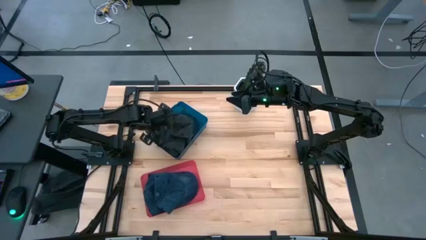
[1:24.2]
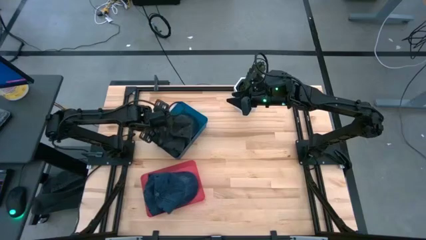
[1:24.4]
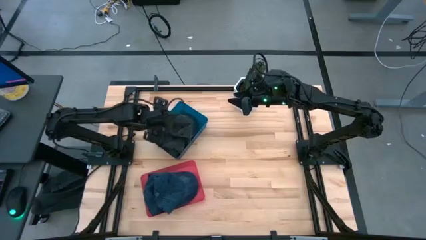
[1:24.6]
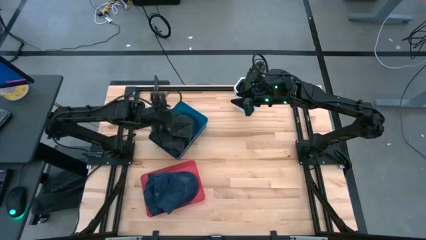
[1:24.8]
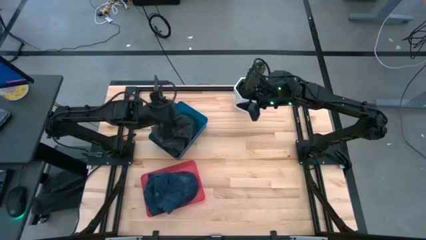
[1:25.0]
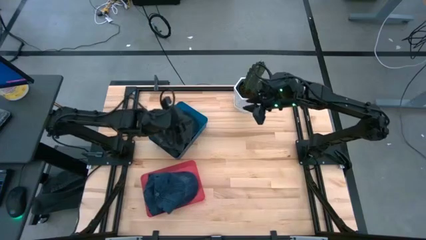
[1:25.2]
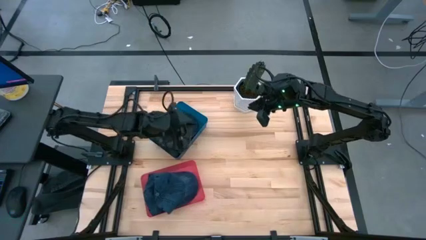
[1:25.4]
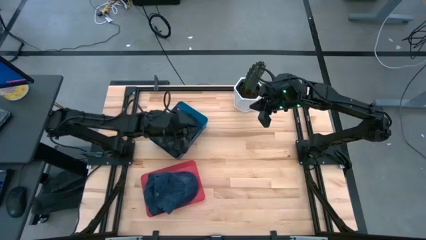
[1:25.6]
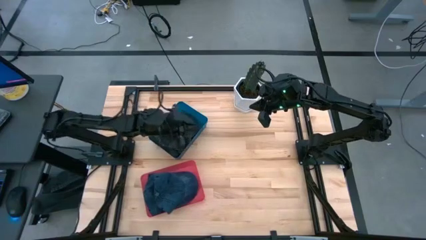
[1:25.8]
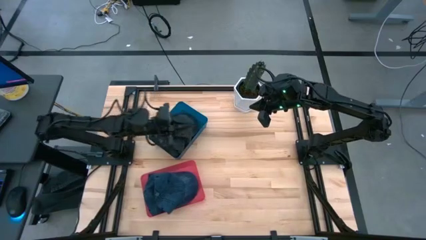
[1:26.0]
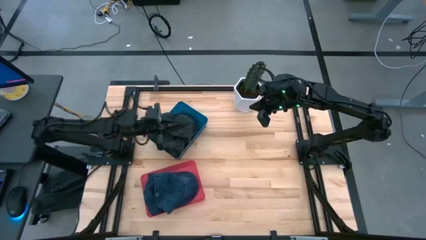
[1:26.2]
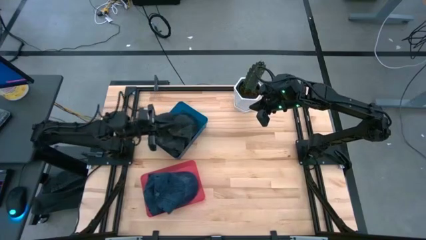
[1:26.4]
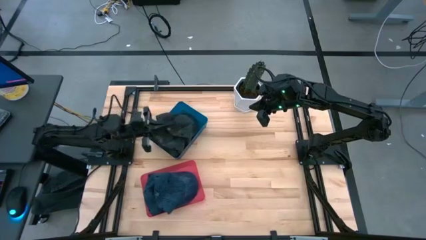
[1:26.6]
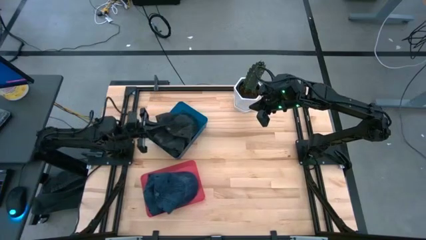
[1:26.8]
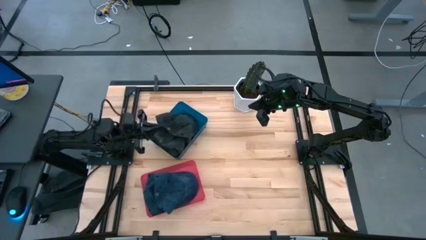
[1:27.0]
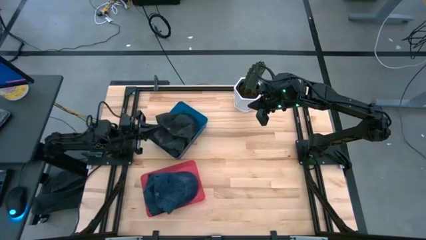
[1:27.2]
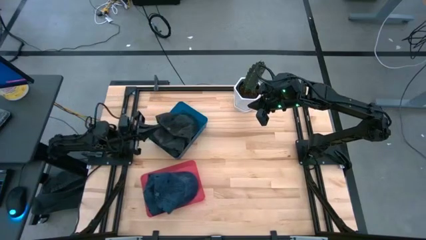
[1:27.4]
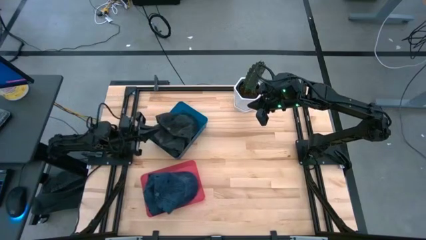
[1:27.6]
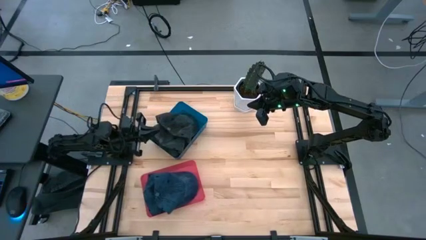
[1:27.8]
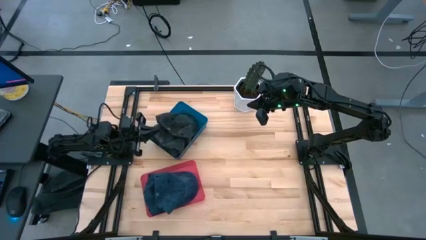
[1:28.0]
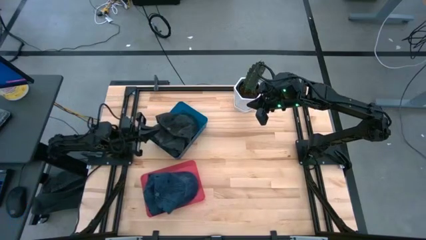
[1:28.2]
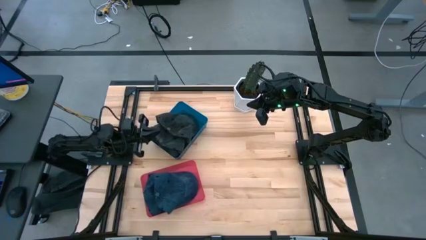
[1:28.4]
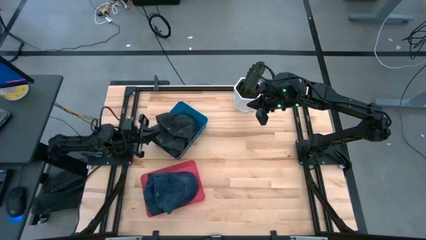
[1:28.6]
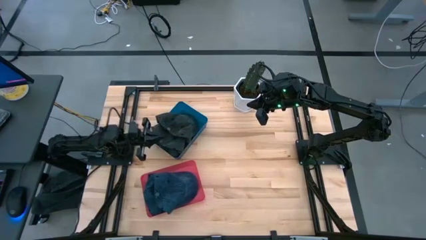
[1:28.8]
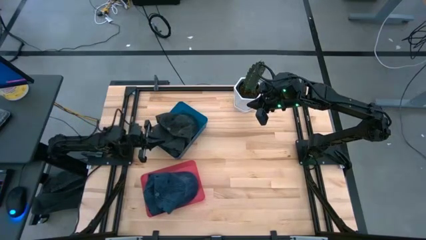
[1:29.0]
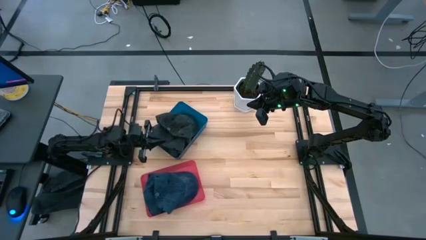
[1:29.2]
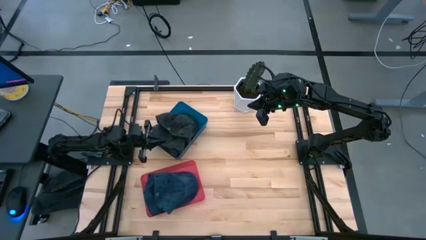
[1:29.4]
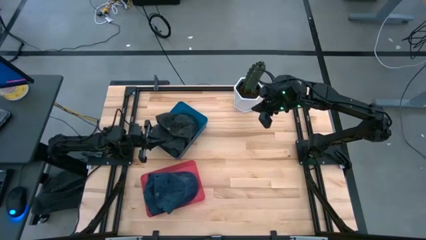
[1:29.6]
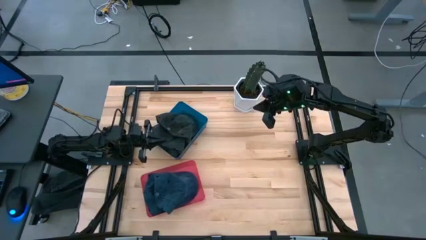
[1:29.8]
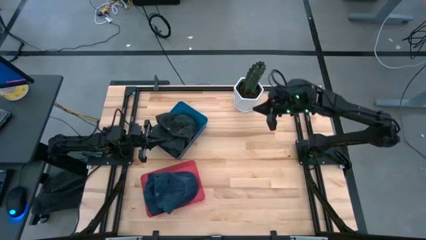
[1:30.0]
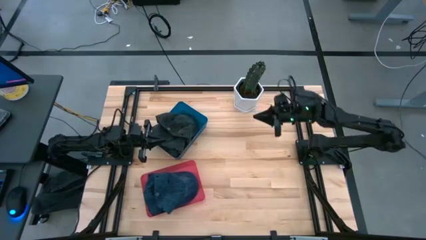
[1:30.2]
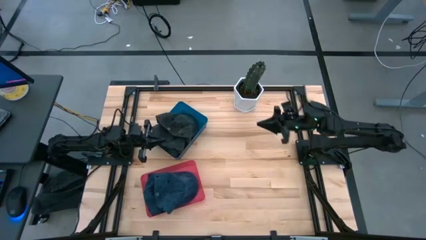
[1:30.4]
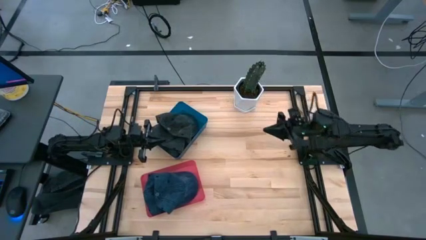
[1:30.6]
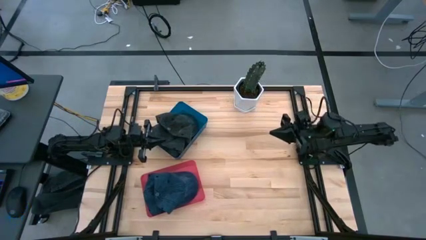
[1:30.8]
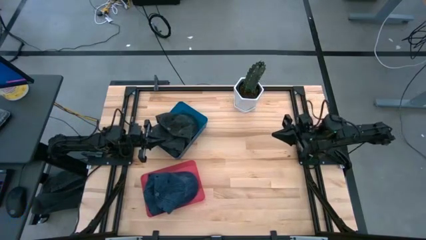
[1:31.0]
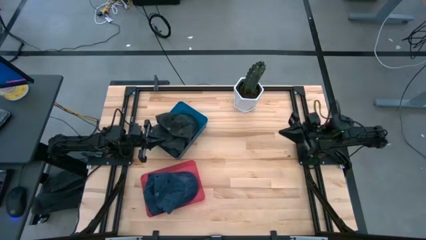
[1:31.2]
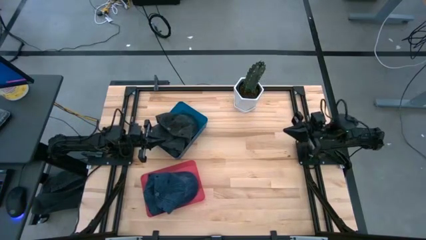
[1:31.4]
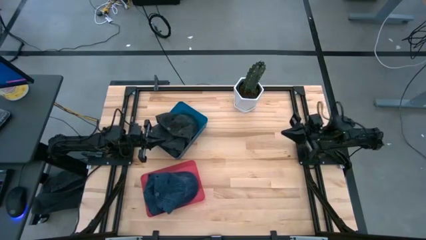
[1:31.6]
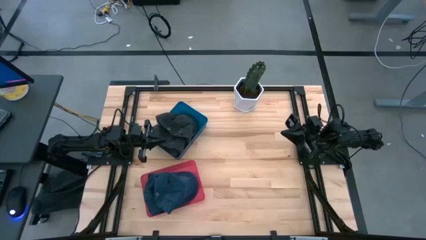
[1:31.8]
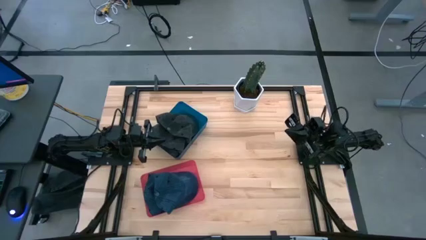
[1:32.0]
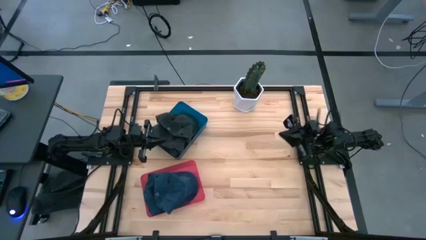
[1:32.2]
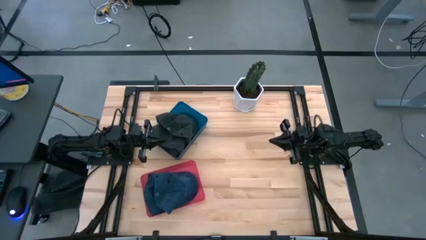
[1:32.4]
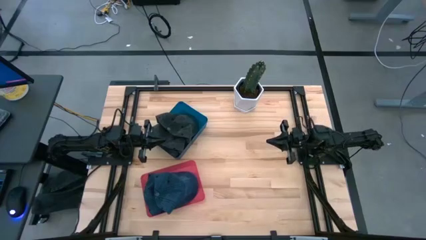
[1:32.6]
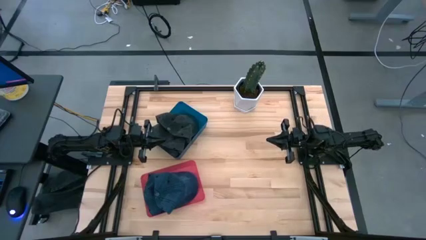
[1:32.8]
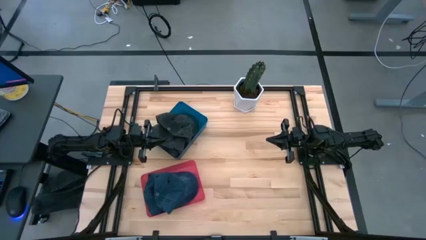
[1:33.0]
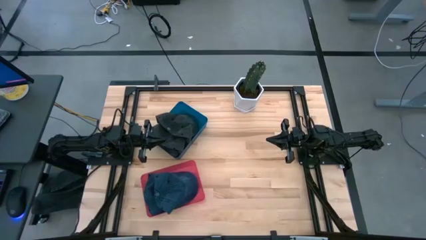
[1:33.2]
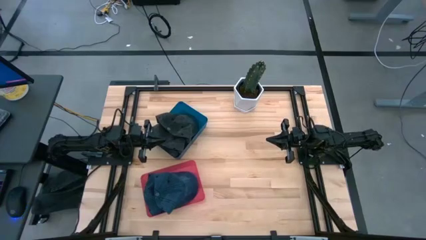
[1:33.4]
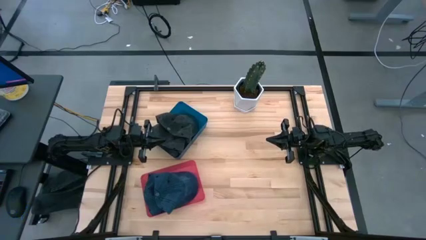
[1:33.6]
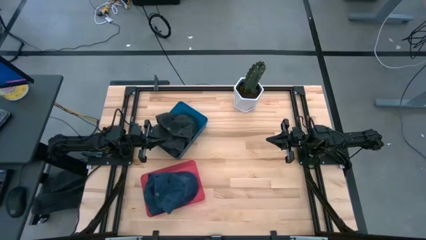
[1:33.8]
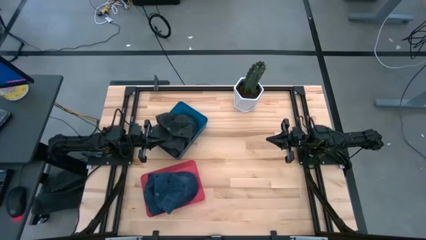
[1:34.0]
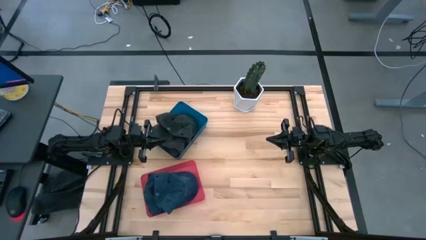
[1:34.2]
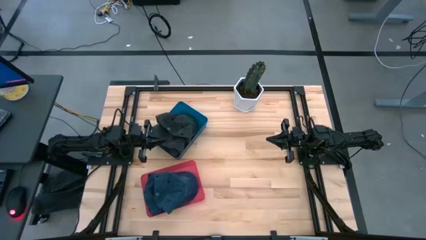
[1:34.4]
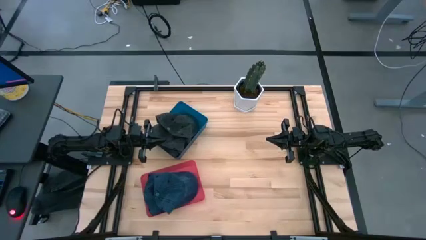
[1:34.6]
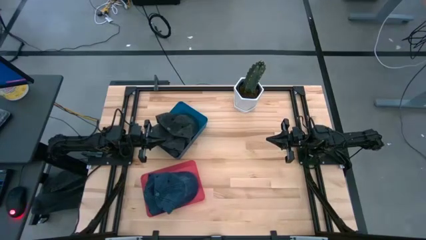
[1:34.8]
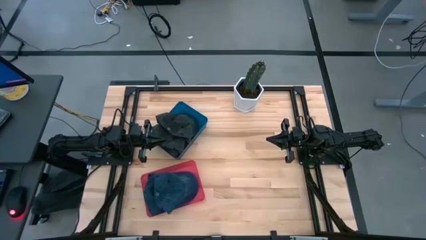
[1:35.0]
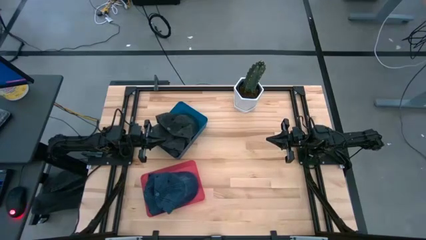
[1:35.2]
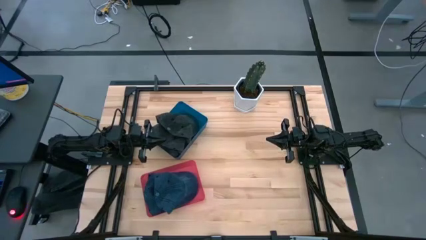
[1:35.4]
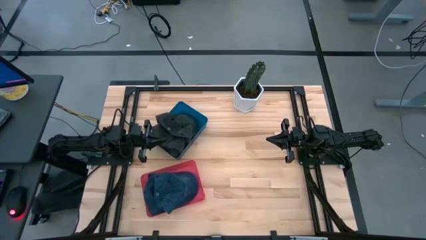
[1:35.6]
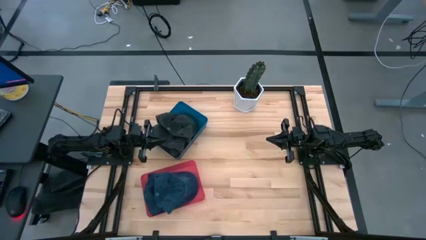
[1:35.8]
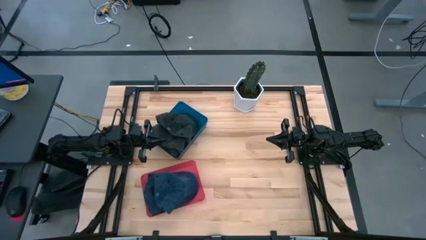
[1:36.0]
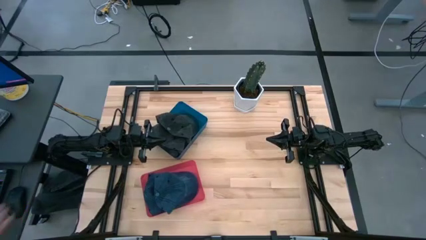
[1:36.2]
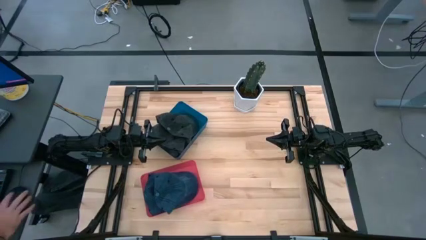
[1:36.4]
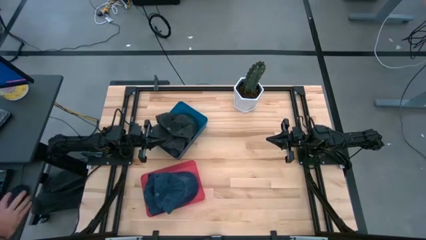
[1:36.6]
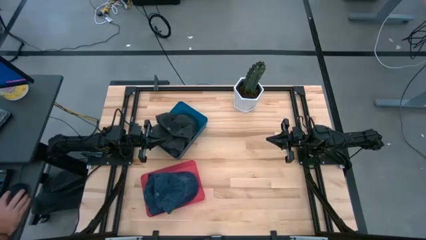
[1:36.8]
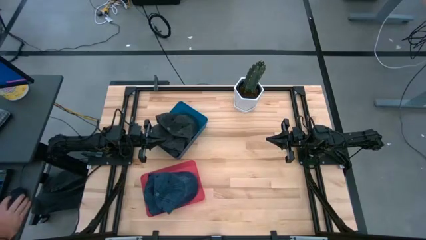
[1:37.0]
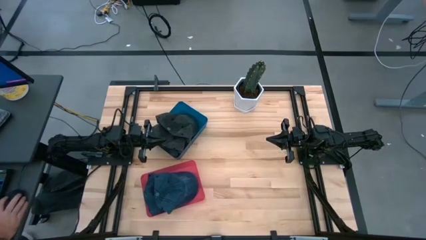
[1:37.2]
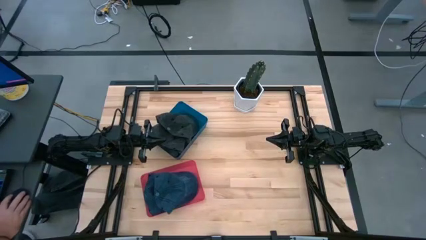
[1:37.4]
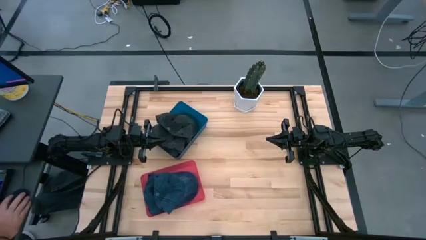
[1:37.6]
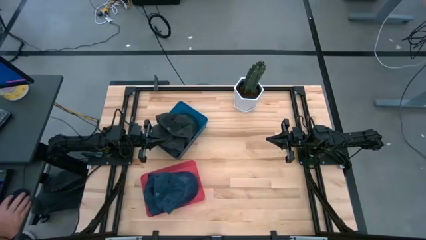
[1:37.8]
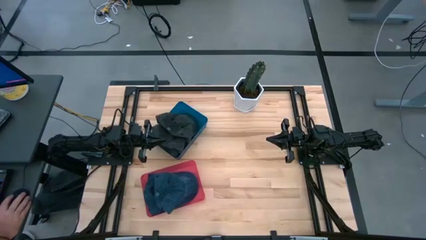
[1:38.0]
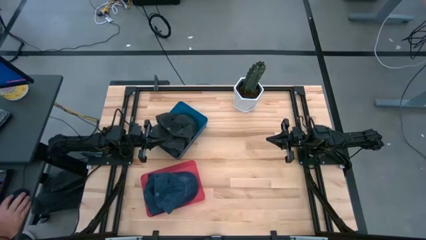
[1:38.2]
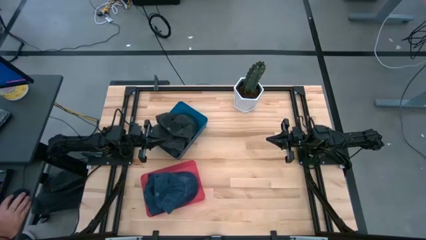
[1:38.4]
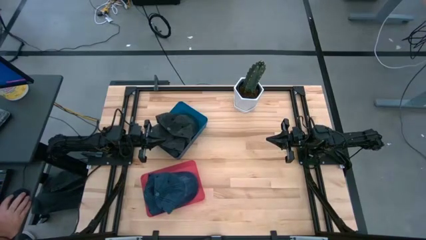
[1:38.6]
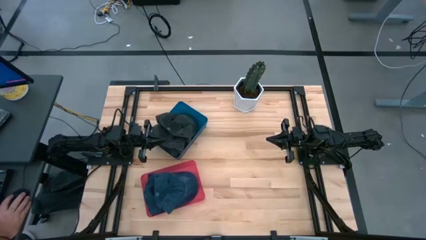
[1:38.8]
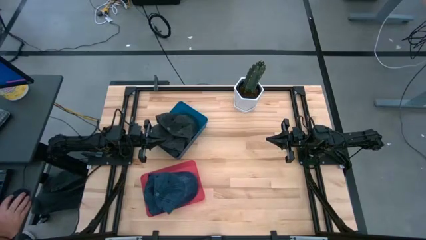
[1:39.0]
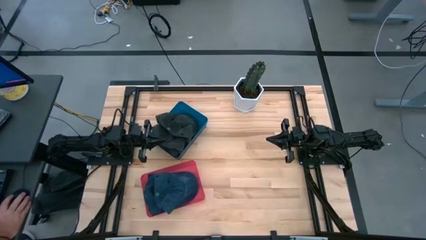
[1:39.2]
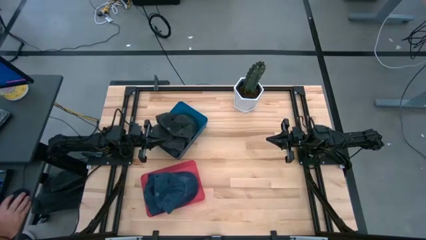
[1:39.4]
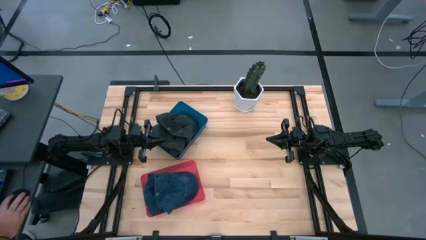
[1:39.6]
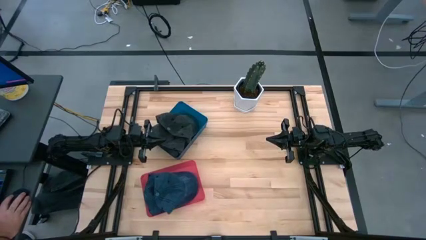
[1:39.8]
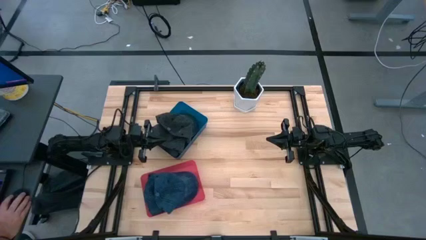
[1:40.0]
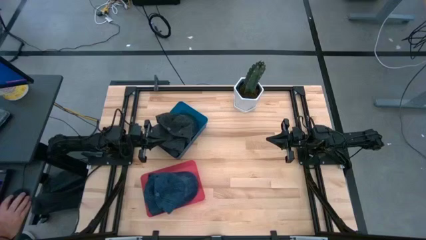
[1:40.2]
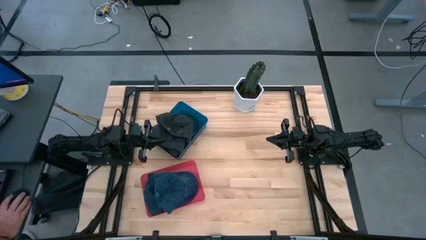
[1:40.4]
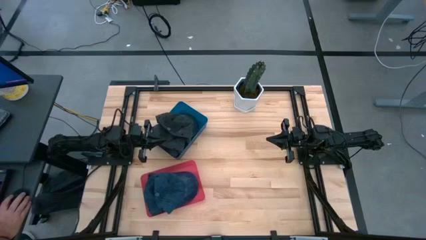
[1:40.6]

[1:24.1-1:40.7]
Task: Pick & Place hat
Return to Home Position

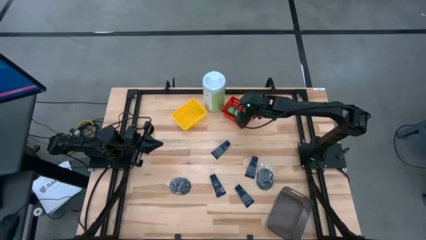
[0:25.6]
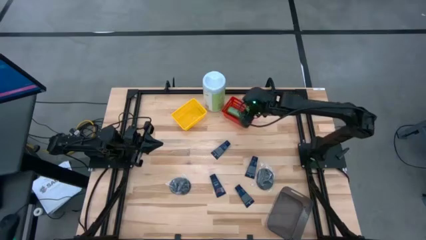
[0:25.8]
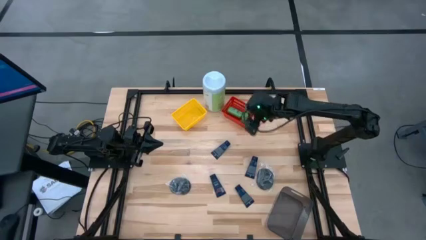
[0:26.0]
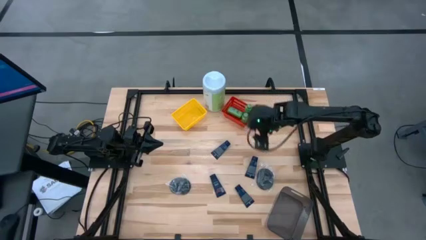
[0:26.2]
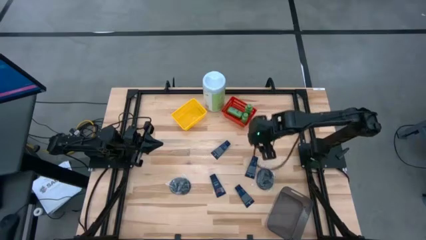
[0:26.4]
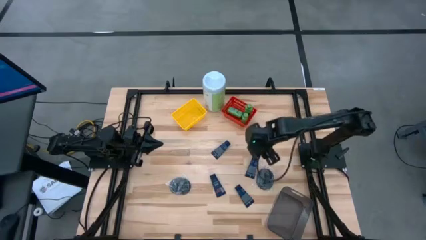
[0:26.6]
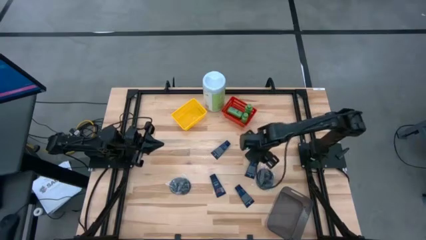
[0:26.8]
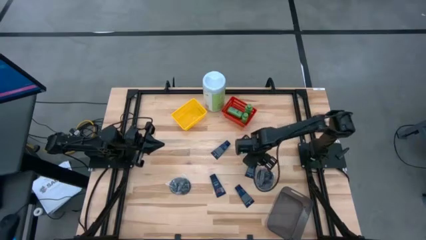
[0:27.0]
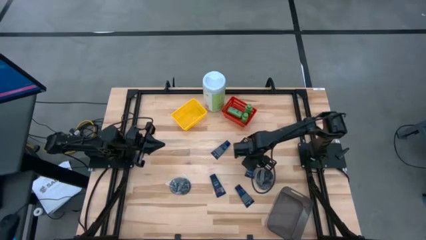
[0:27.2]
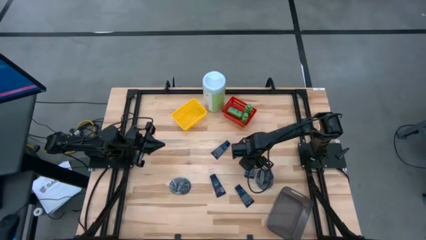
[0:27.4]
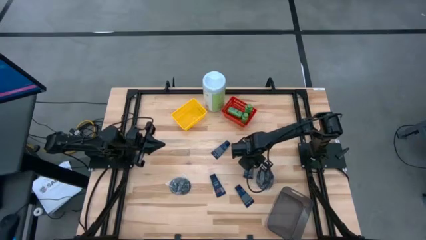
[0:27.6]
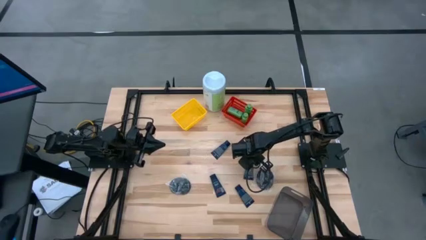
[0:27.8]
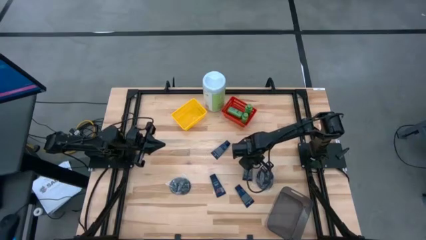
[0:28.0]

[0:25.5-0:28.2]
Task: Pick & Place Travel size toiletries
Put the dark blue shave cream in the black bin
